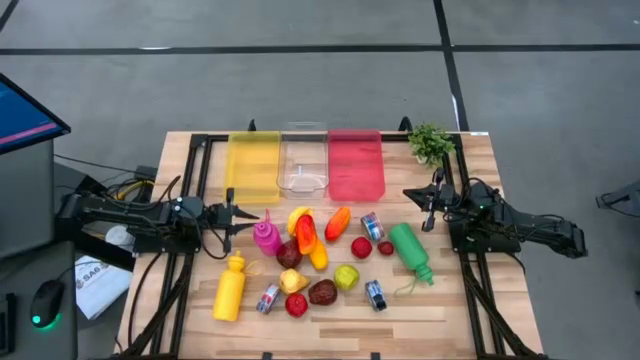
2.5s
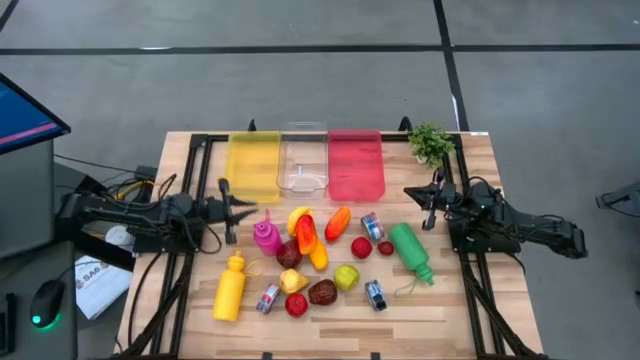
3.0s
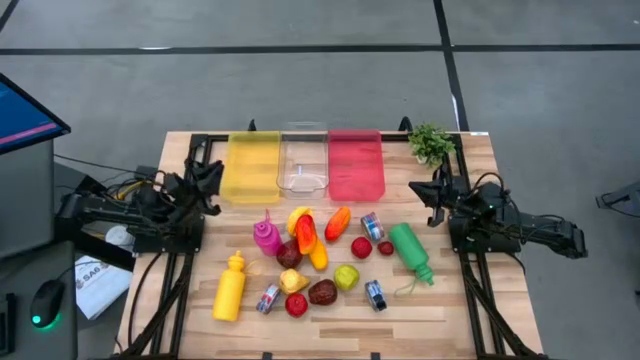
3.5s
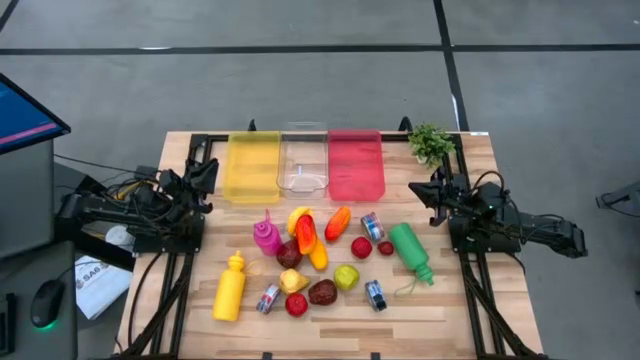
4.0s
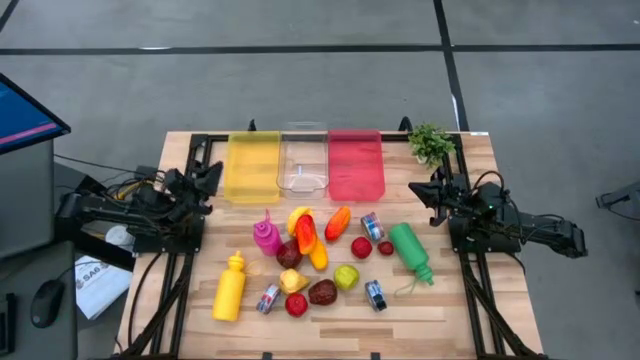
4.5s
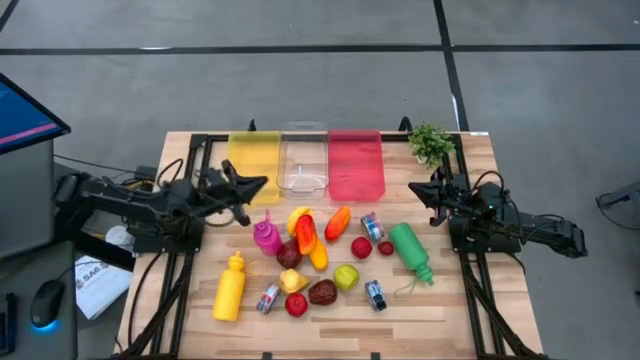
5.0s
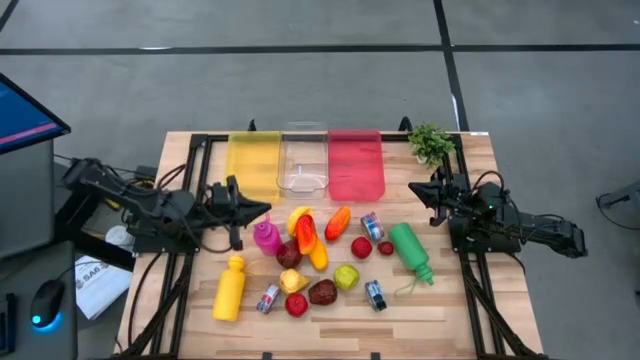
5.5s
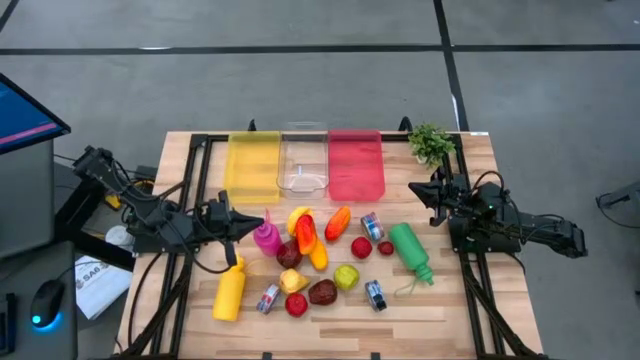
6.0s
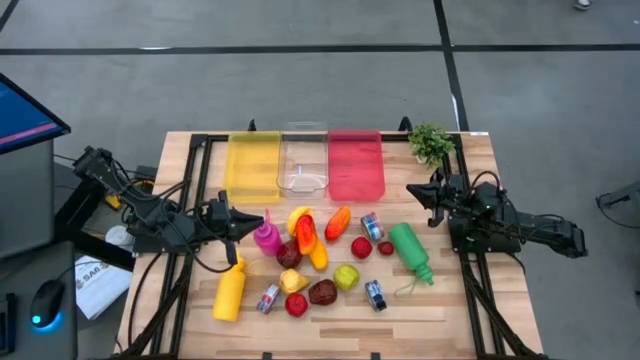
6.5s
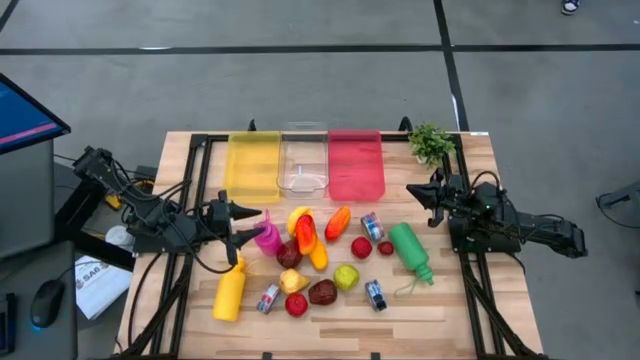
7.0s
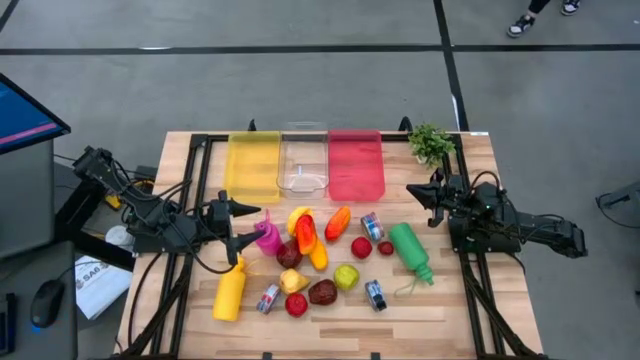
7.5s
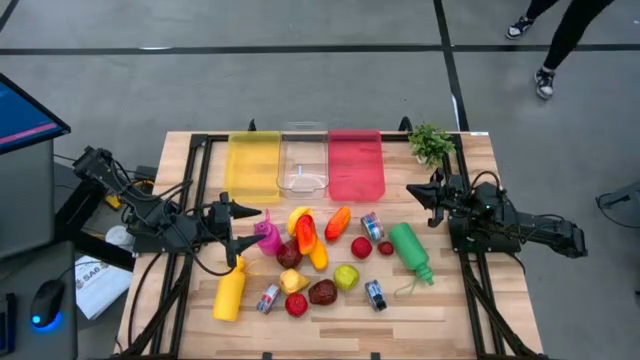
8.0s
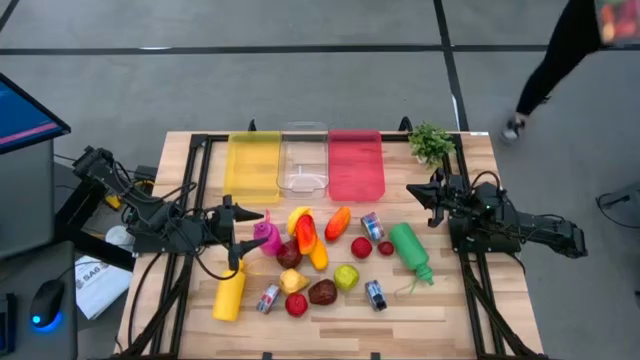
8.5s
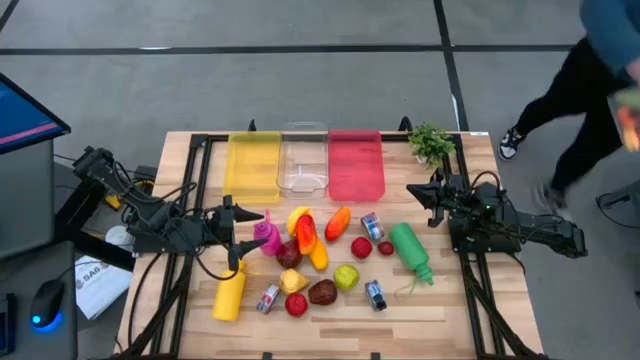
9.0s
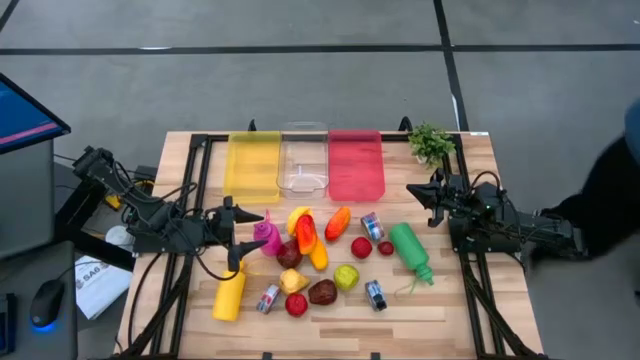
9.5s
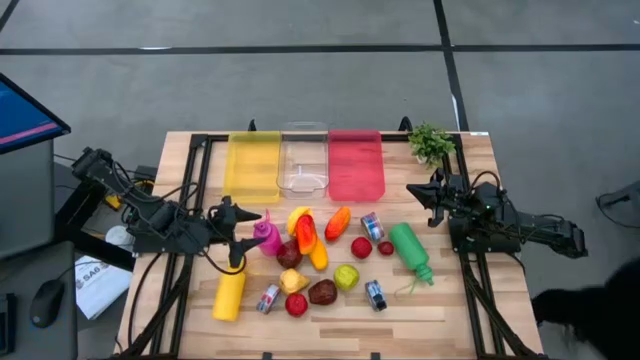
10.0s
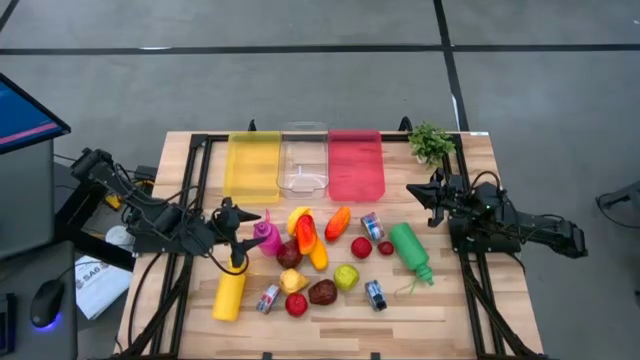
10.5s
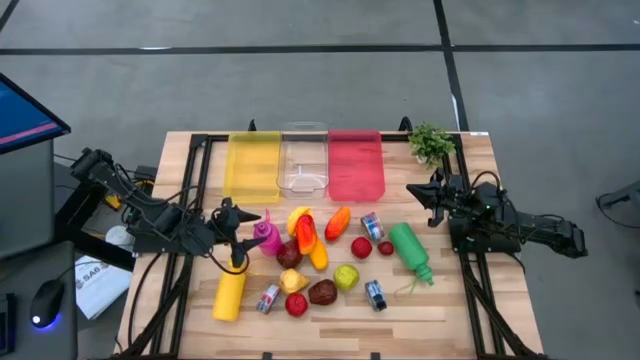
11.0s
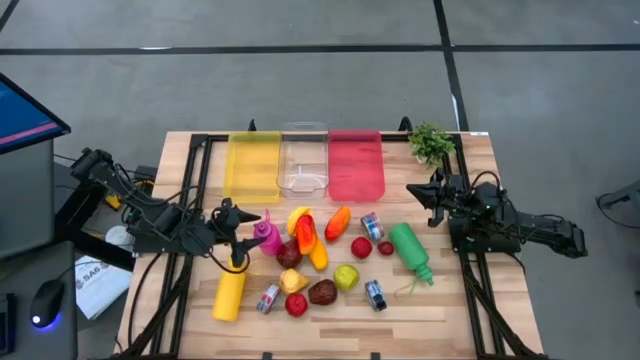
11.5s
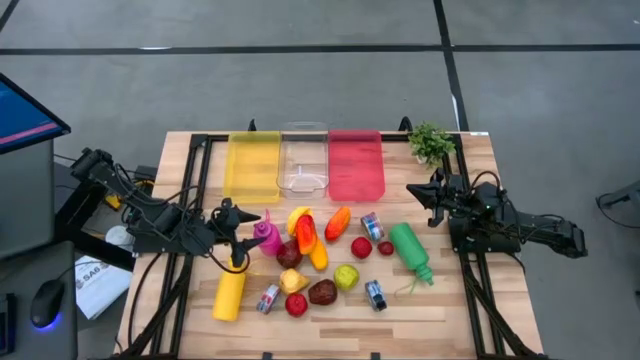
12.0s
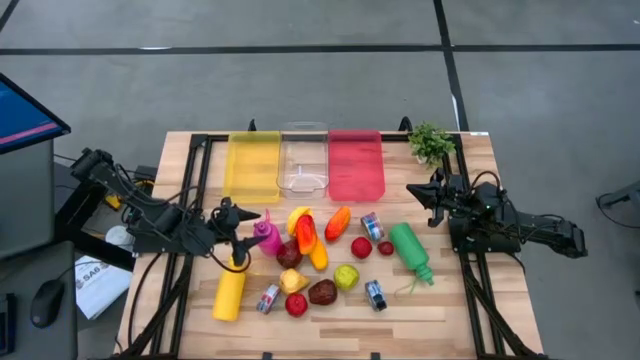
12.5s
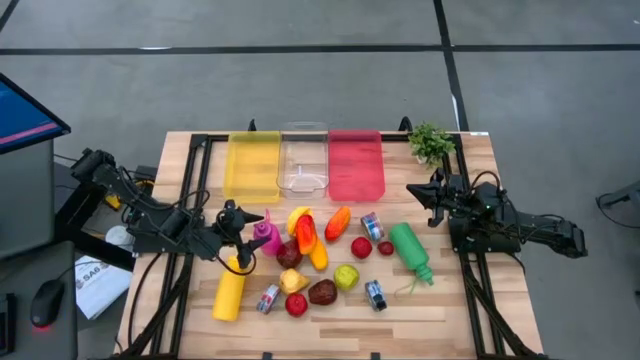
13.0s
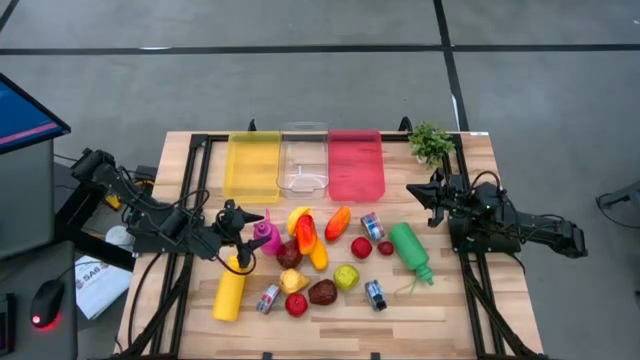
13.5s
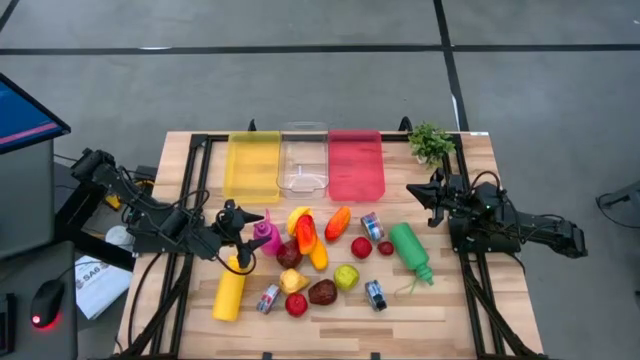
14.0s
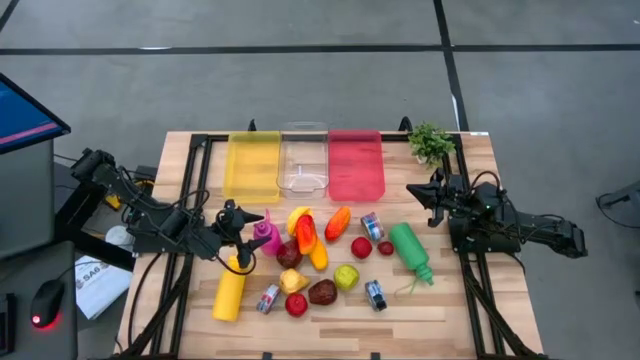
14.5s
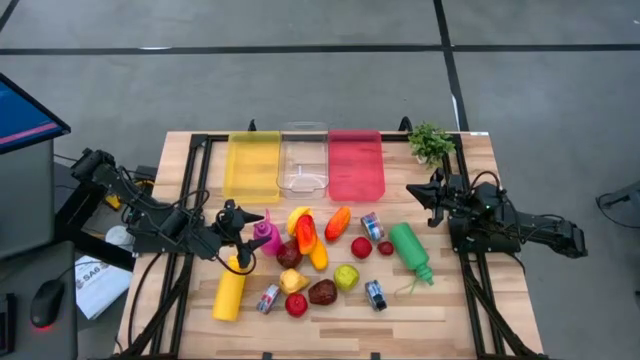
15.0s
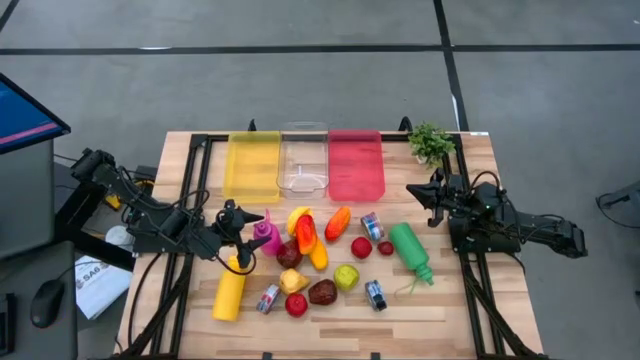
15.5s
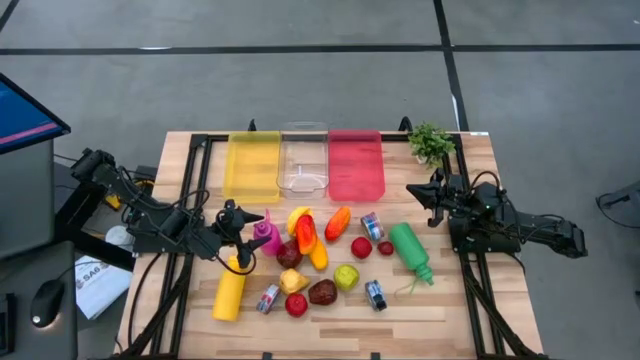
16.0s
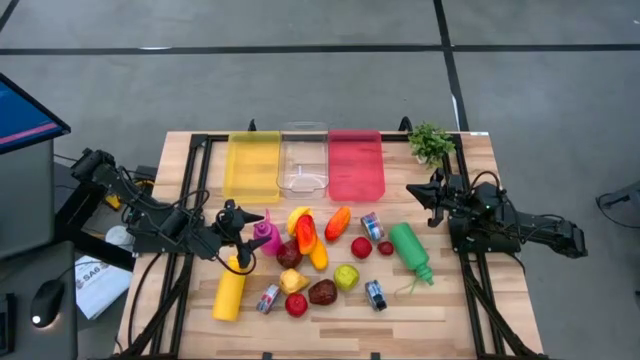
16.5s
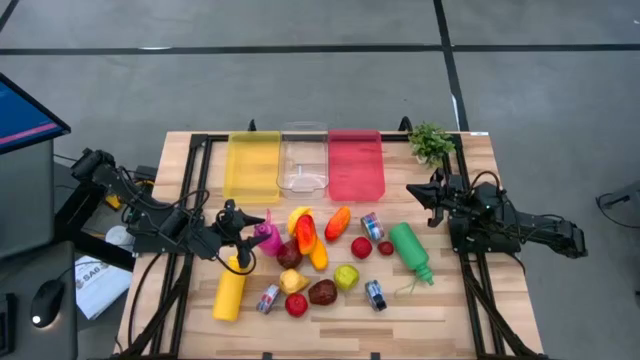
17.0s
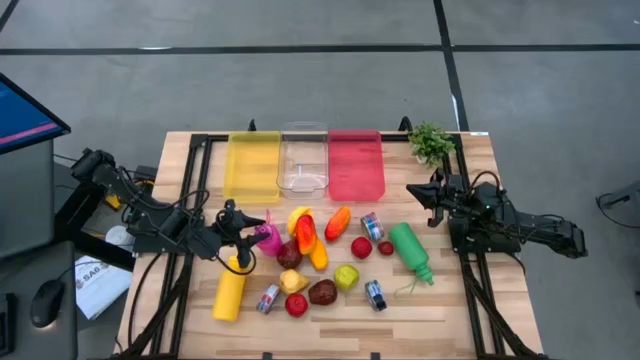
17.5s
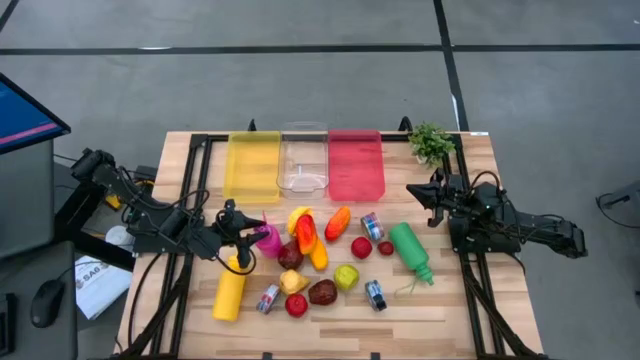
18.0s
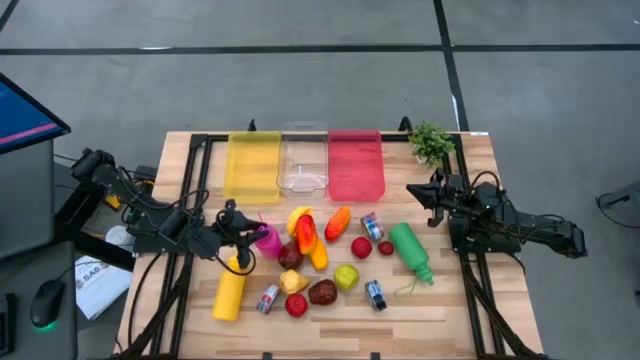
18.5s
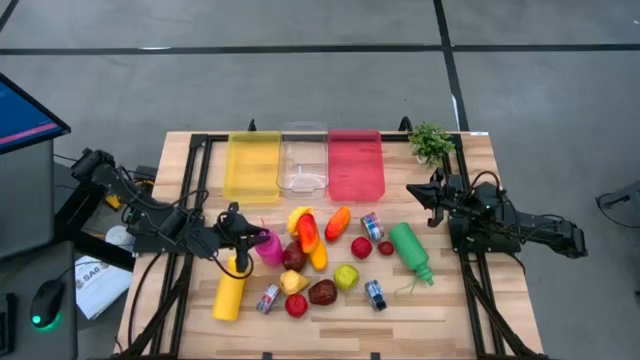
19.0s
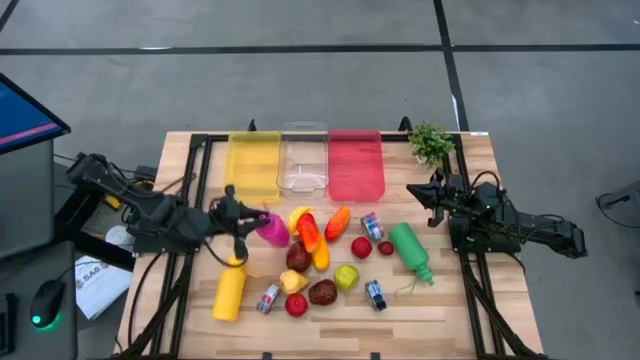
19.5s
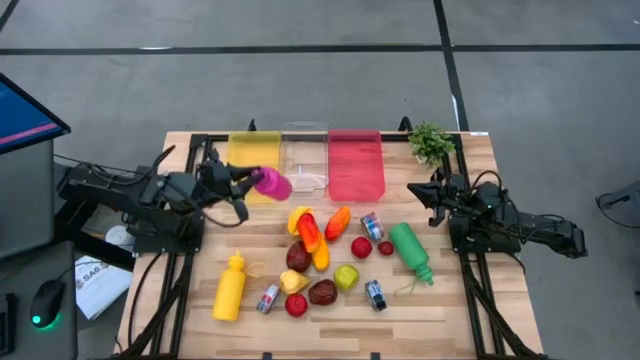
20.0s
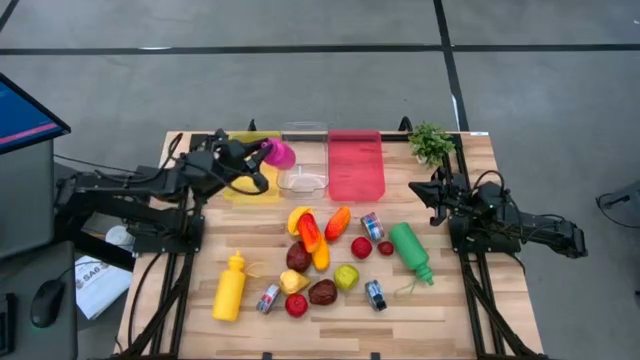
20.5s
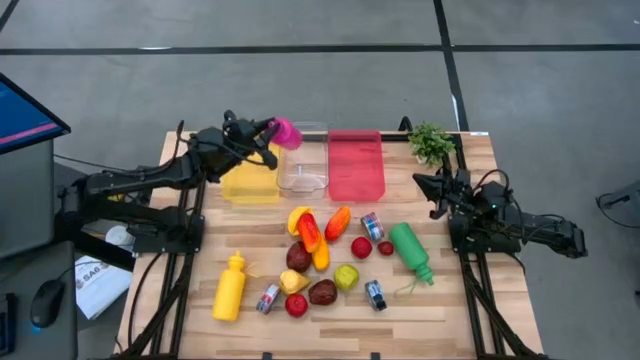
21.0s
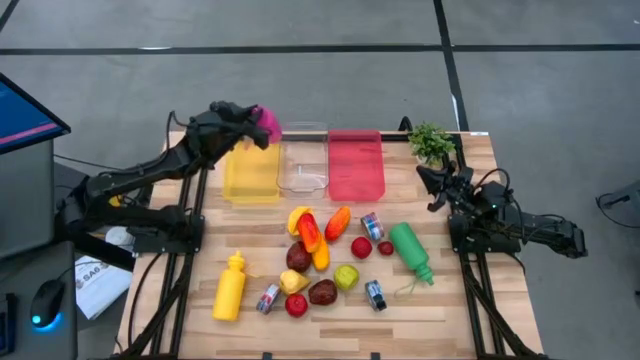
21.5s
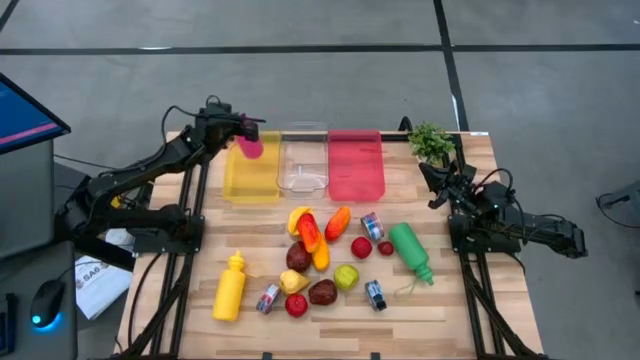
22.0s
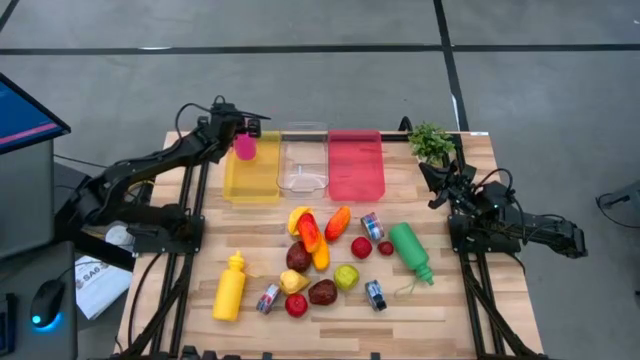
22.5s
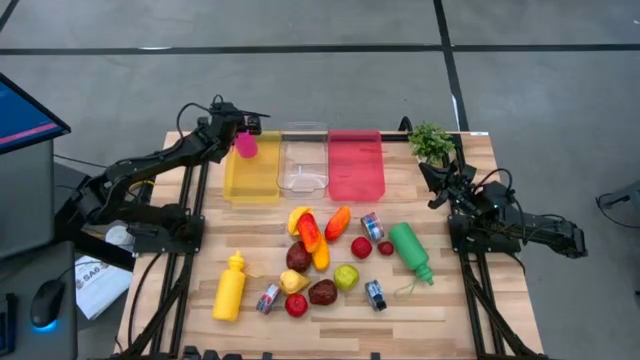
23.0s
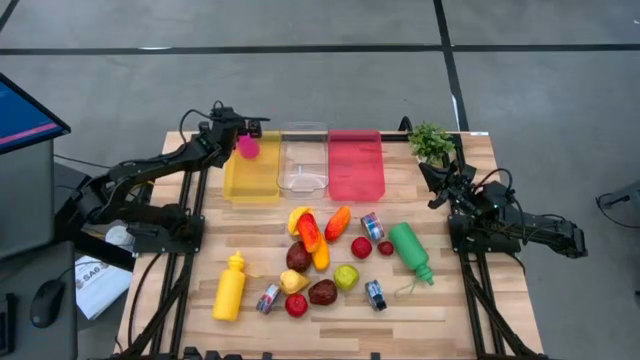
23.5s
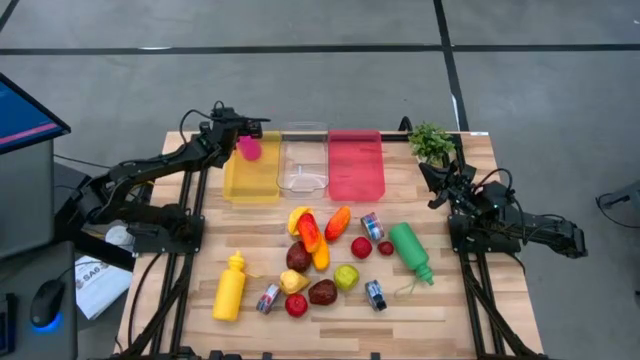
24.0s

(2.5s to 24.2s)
Task: Pick & Place Food Item
Put the pink tumbler into the yellow bin
